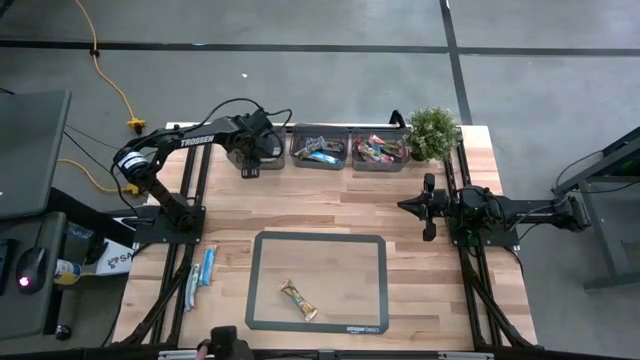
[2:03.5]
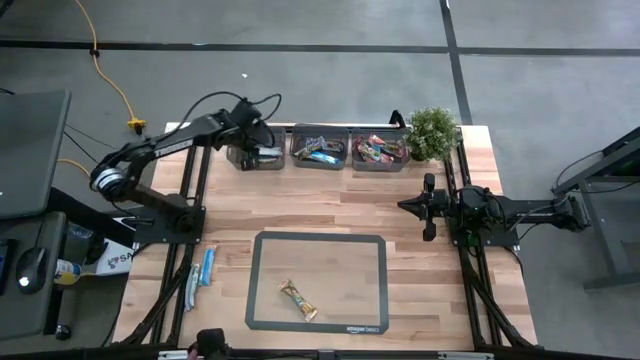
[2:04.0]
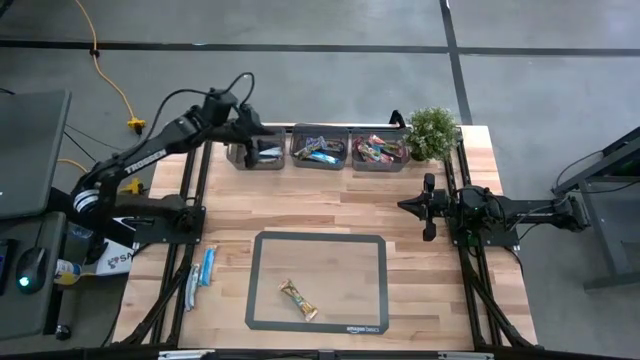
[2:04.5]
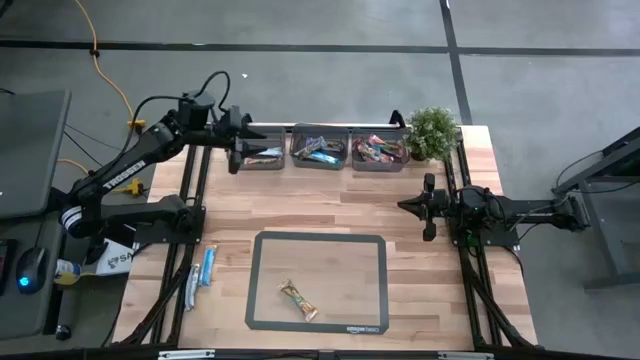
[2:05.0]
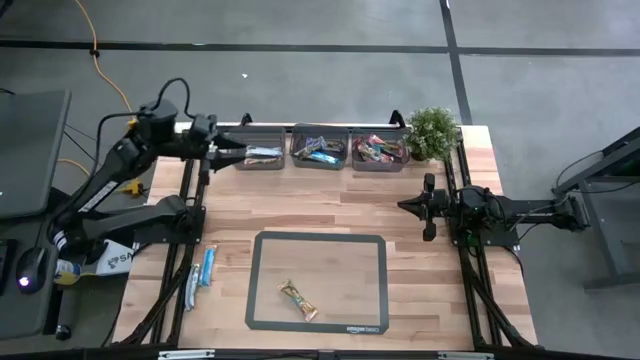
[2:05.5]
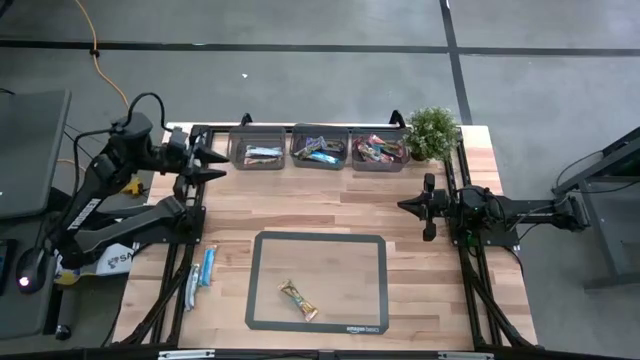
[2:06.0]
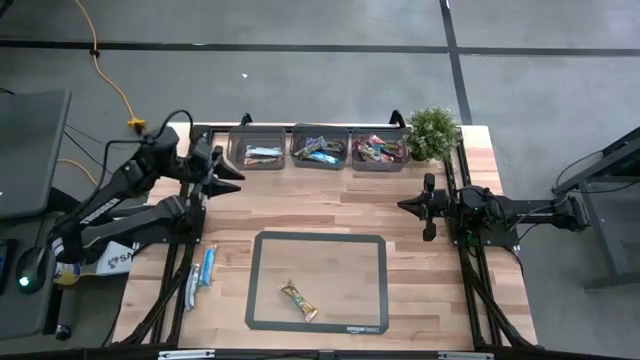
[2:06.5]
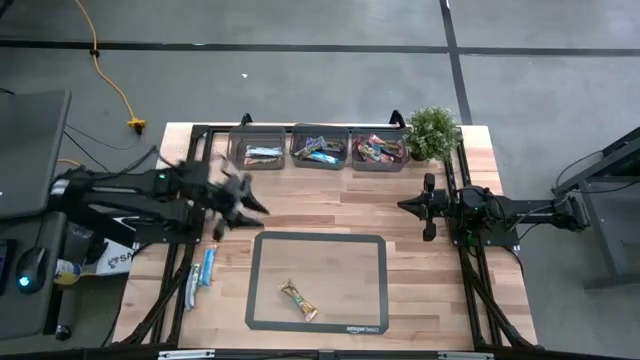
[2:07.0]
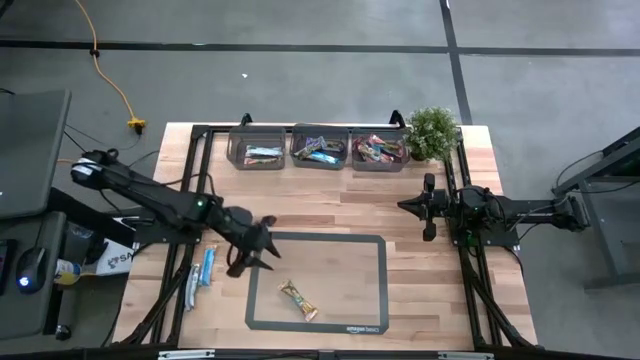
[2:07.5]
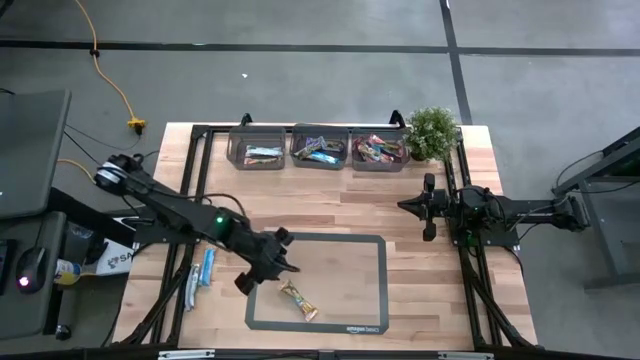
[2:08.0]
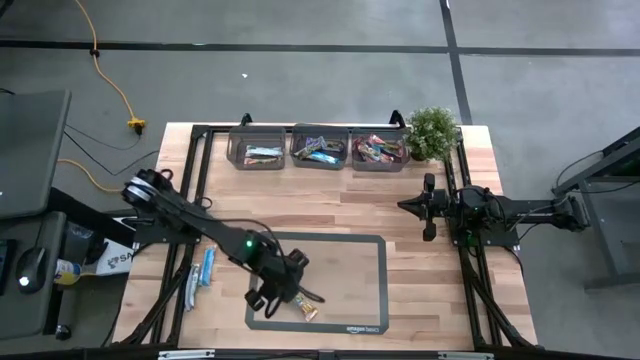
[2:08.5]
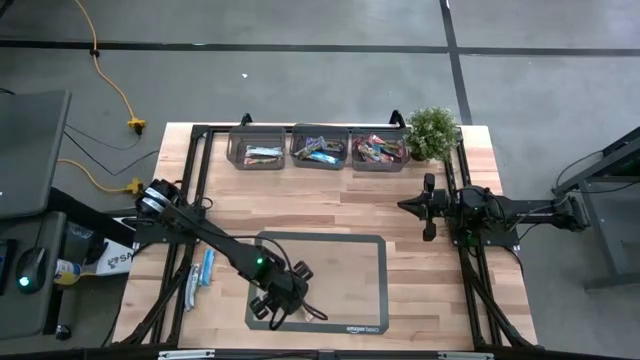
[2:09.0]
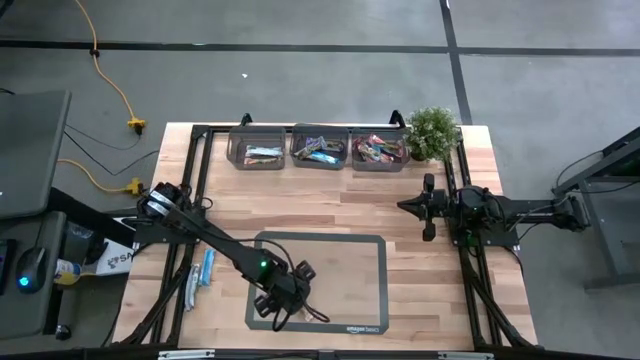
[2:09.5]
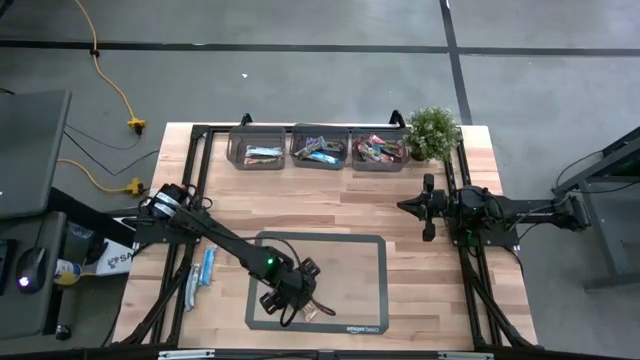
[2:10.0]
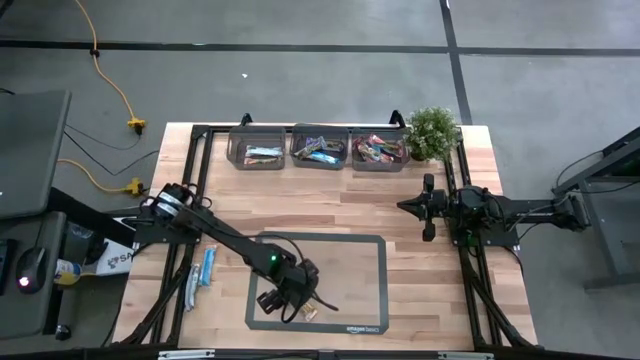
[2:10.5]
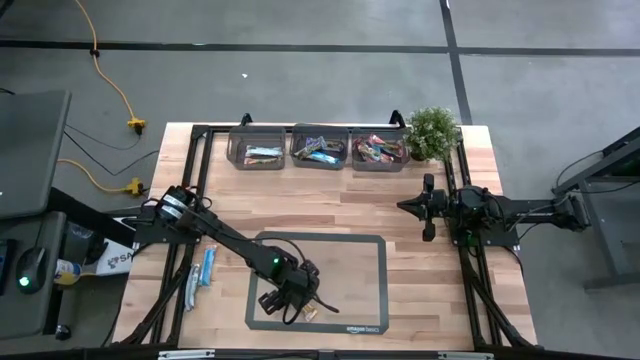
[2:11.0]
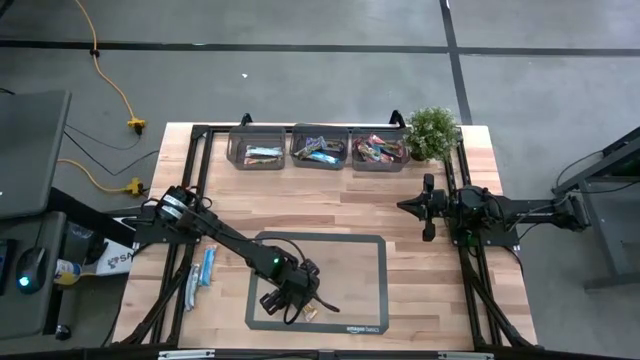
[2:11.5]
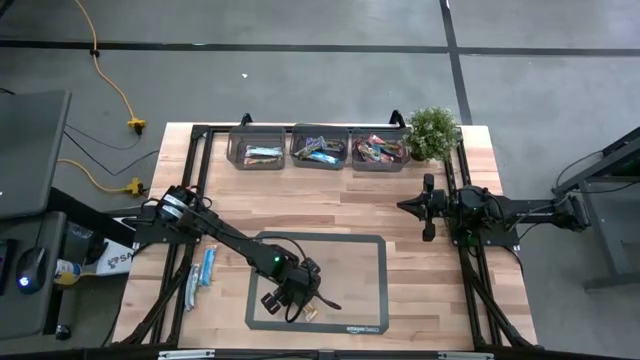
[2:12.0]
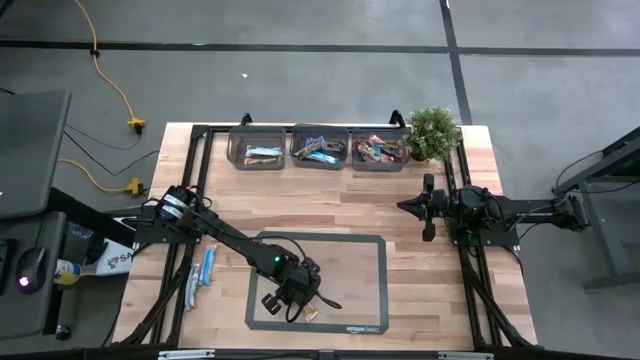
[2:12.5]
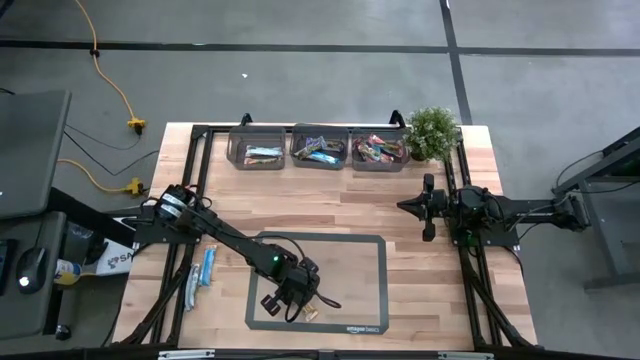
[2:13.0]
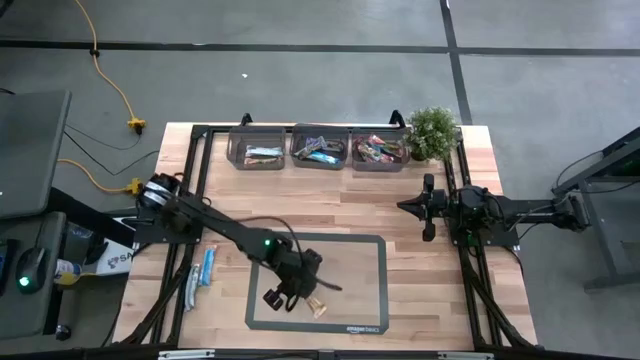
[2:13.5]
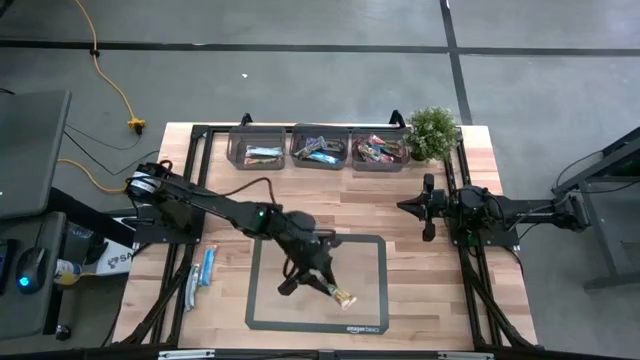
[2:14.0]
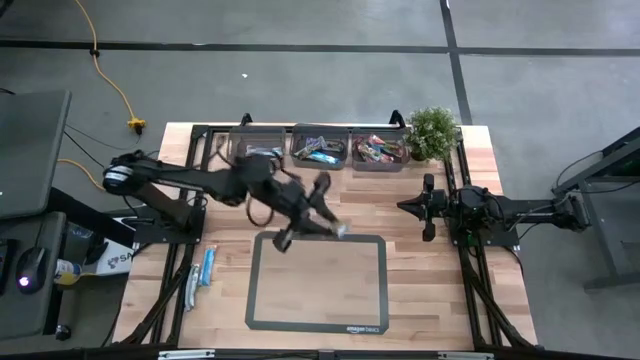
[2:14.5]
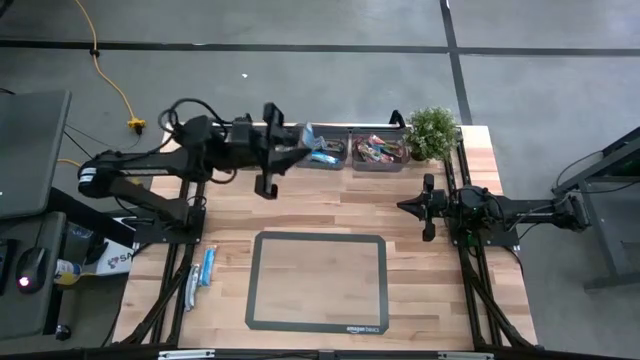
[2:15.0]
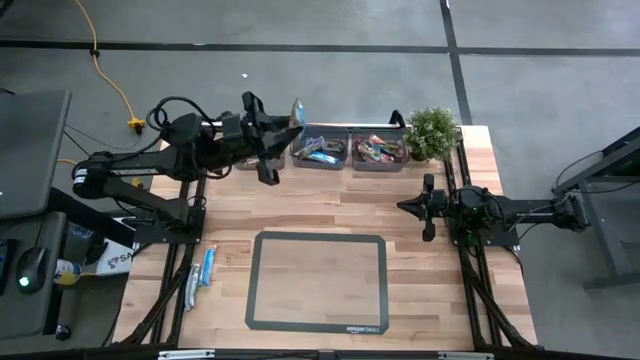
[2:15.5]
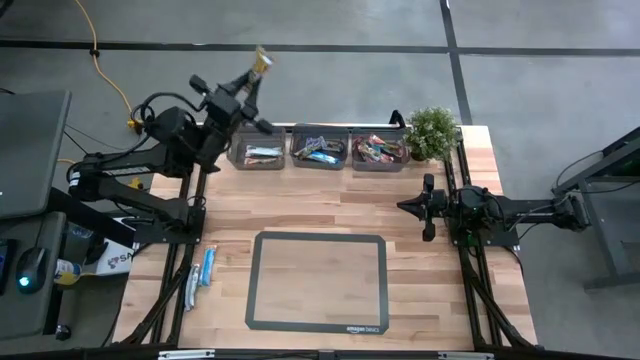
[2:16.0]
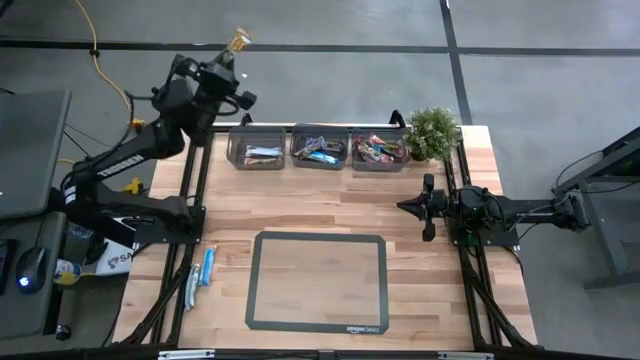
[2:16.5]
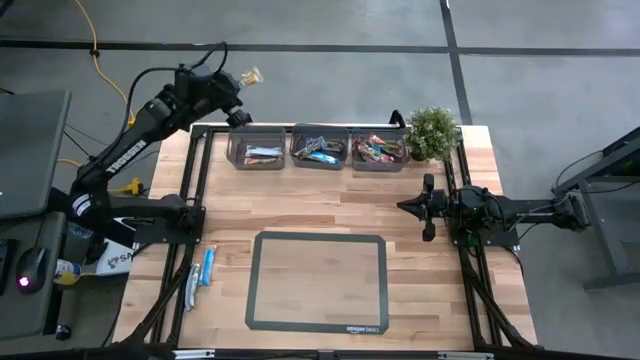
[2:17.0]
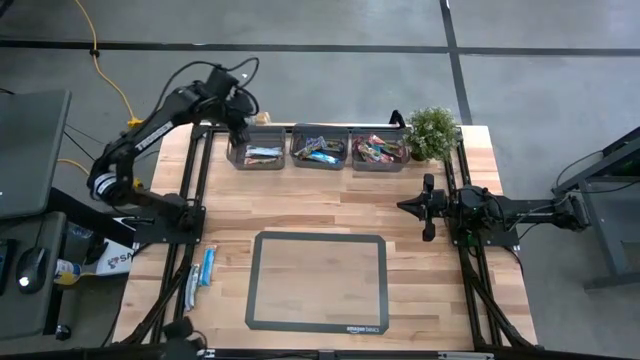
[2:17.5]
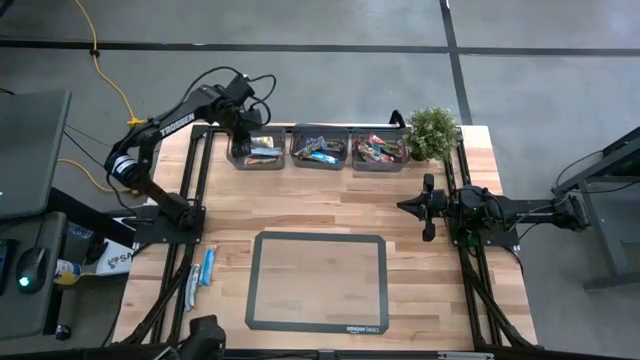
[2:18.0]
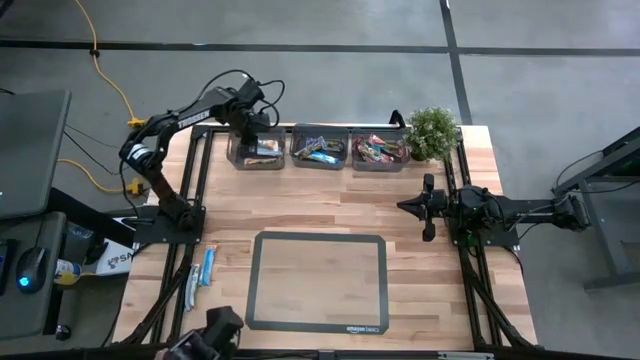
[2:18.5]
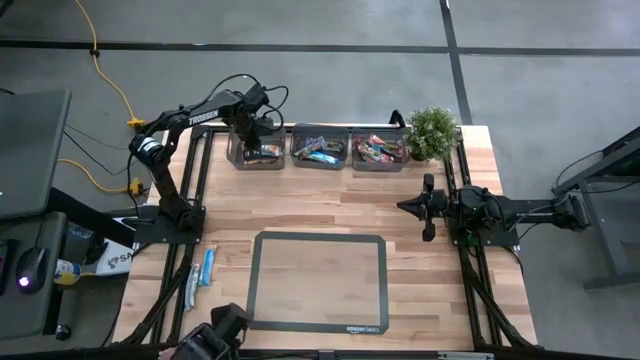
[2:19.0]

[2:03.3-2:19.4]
Task: Pick and place Granola Bars by type
Put the orange granola bar into the left black bin

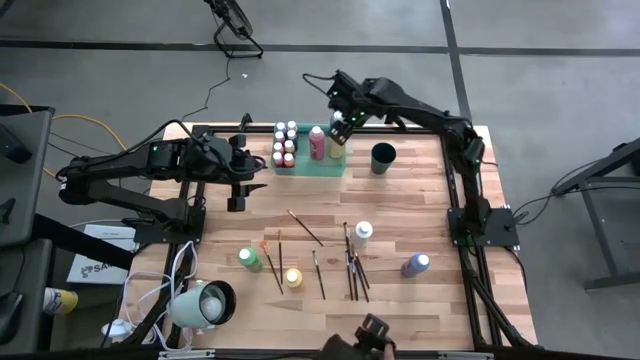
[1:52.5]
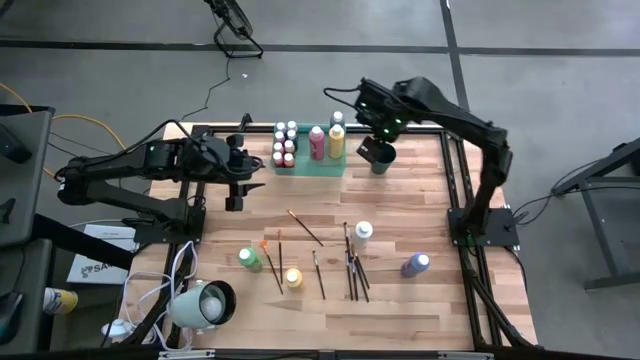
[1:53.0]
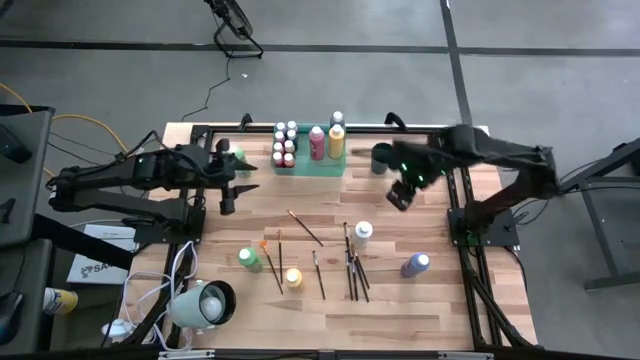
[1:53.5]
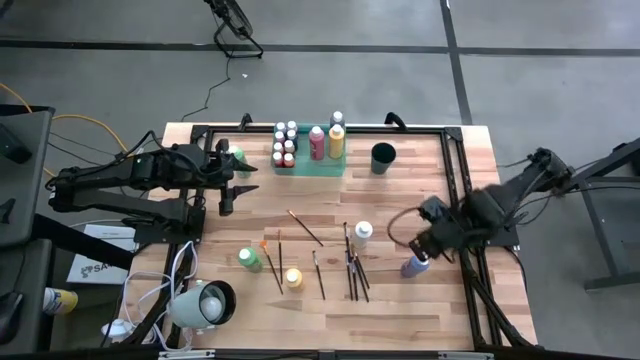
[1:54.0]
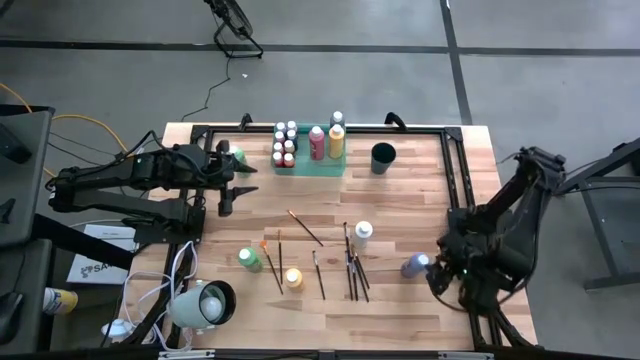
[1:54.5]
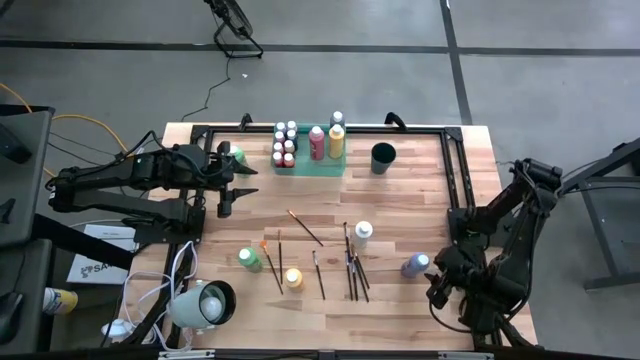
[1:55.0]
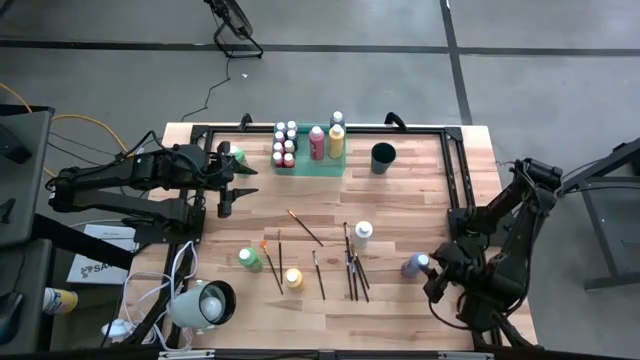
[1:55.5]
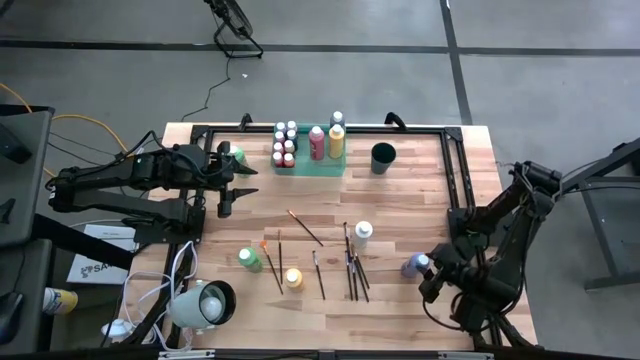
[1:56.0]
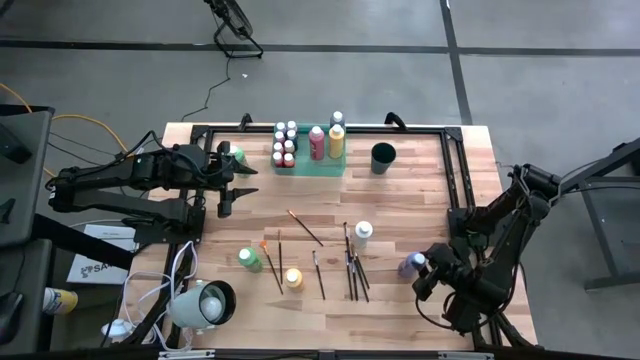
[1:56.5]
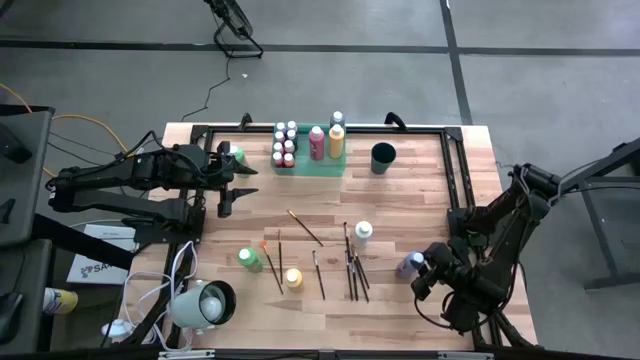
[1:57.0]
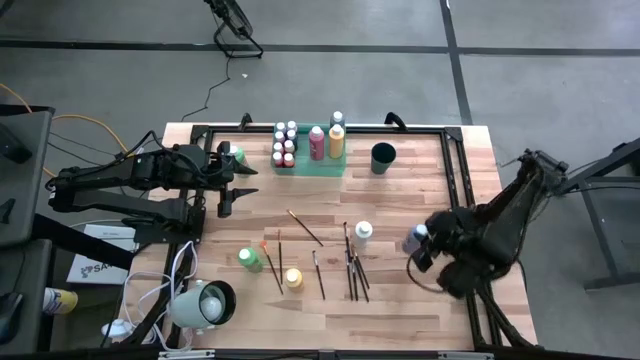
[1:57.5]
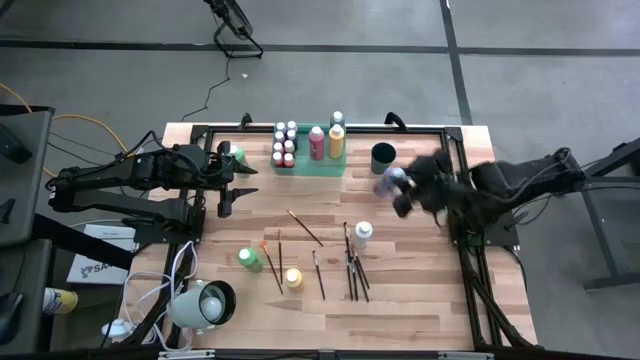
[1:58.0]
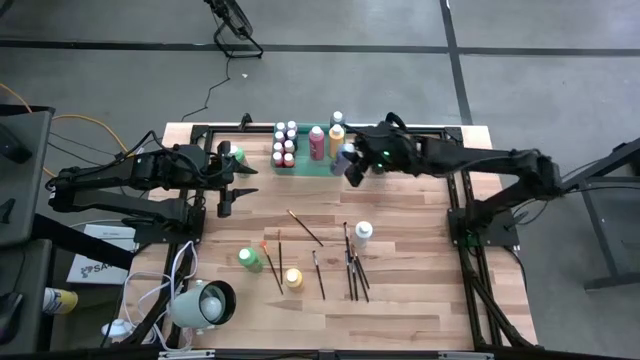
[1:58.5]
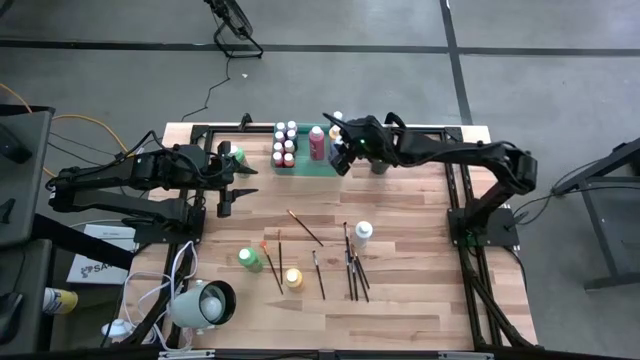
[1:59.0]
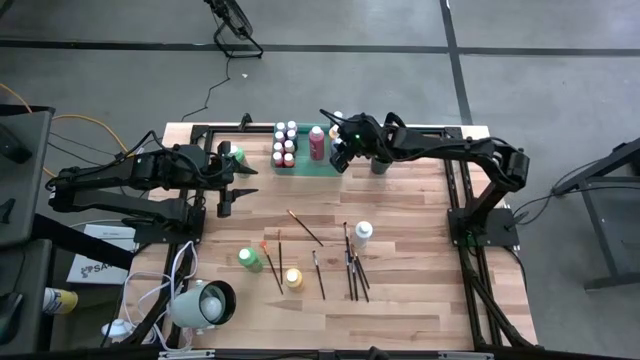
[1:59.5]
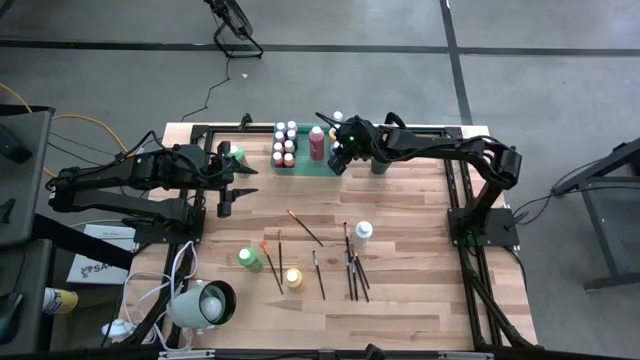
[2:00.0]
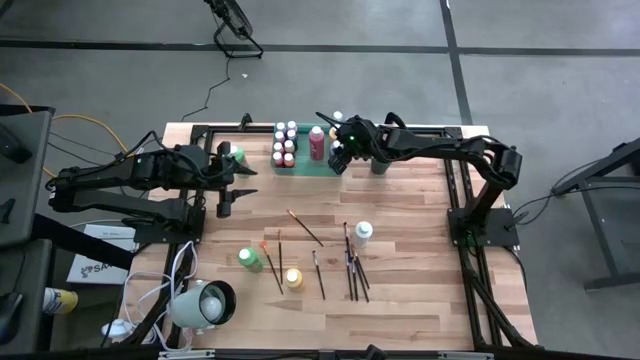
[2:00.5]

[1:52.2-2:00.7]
Task: Pick & Place Paint Supplies
Put the large blue paint bottle into the green bin
